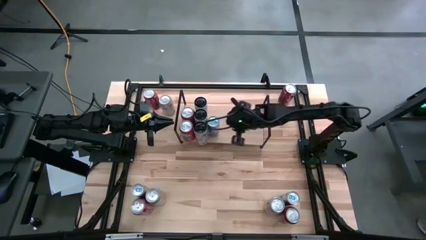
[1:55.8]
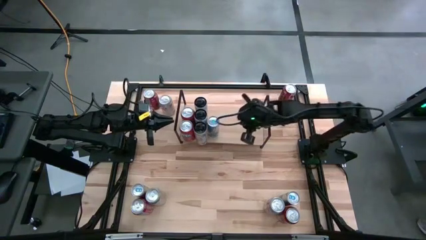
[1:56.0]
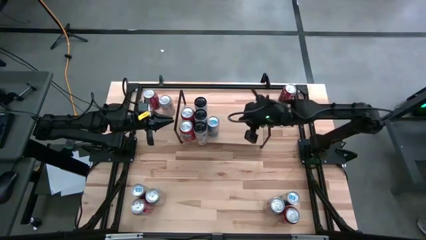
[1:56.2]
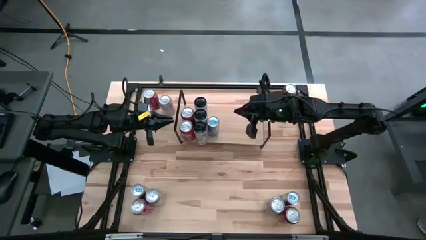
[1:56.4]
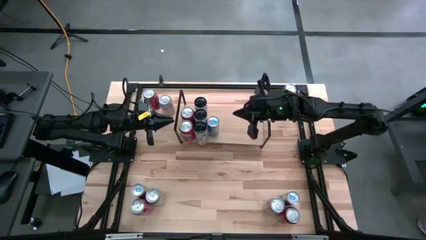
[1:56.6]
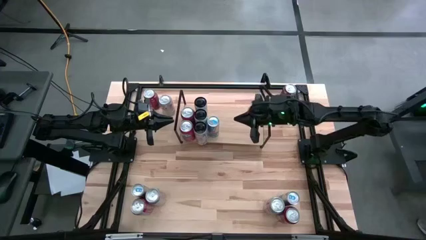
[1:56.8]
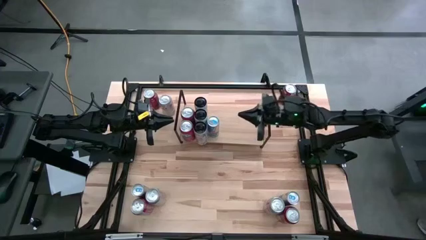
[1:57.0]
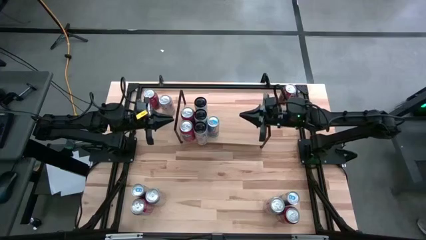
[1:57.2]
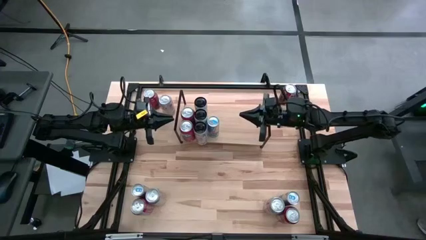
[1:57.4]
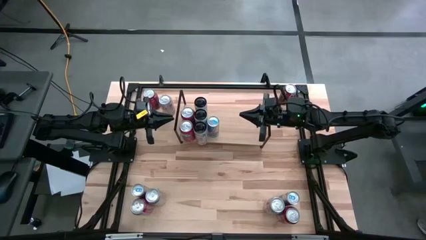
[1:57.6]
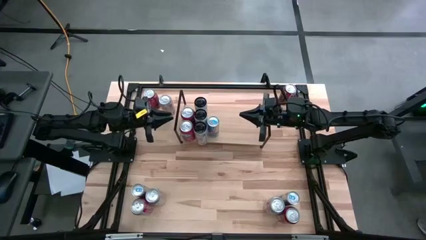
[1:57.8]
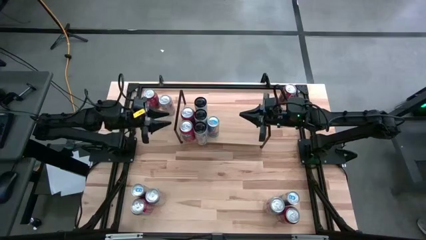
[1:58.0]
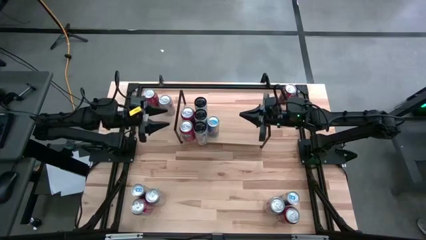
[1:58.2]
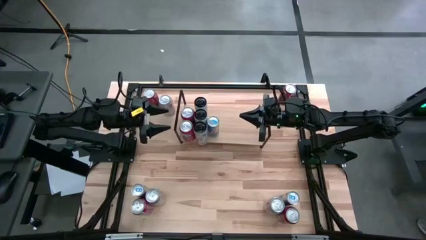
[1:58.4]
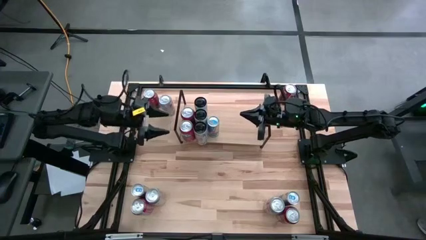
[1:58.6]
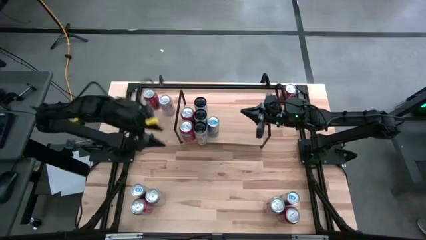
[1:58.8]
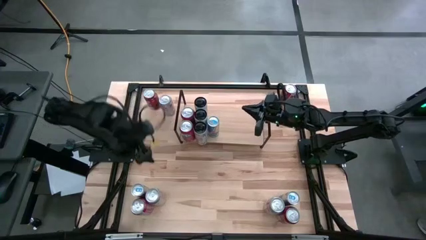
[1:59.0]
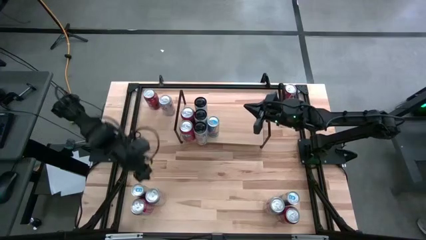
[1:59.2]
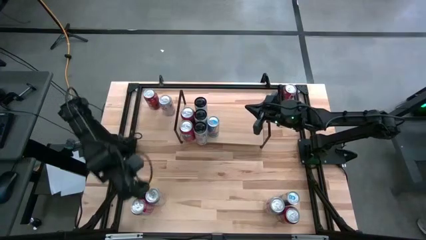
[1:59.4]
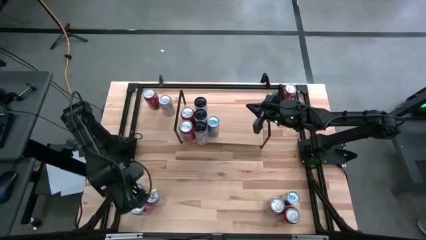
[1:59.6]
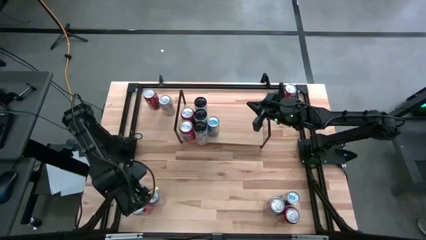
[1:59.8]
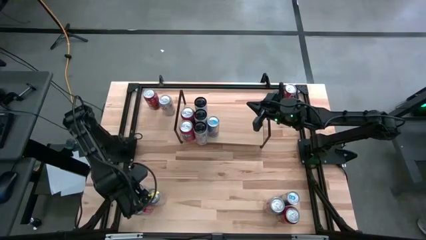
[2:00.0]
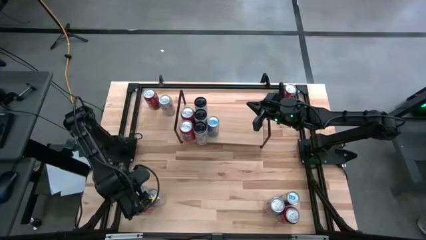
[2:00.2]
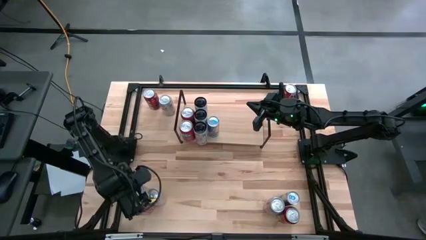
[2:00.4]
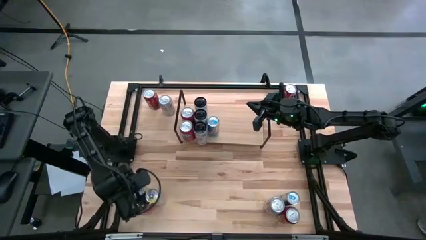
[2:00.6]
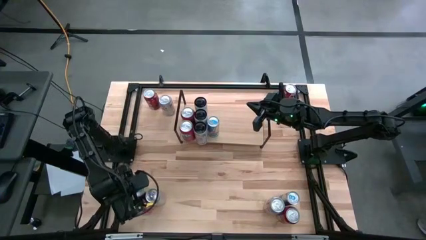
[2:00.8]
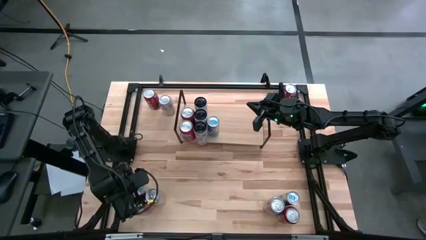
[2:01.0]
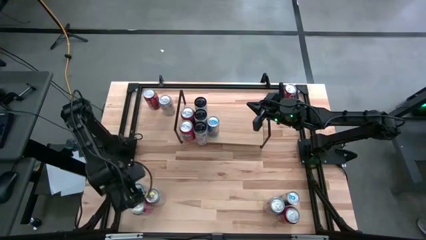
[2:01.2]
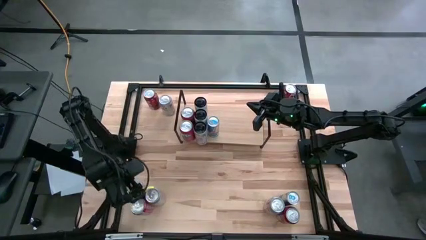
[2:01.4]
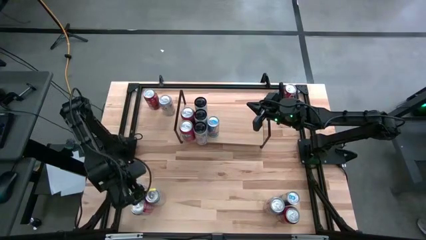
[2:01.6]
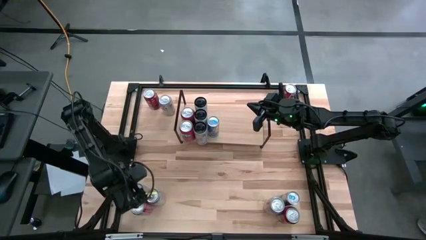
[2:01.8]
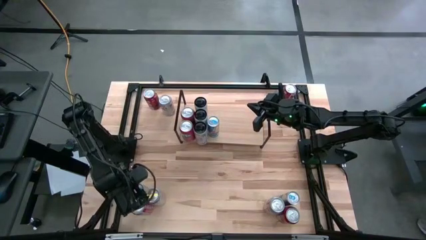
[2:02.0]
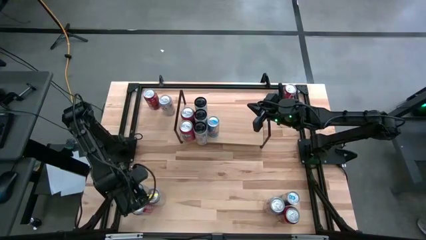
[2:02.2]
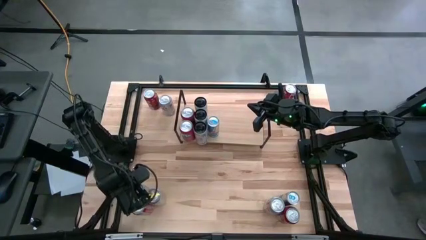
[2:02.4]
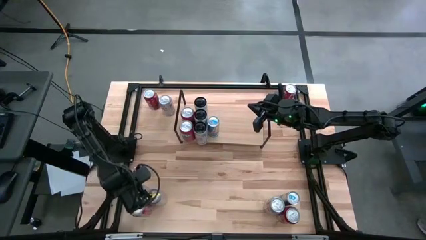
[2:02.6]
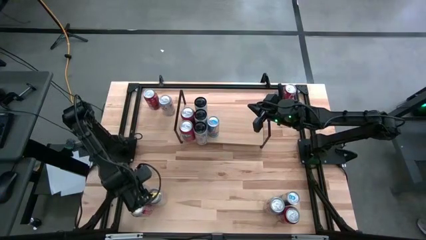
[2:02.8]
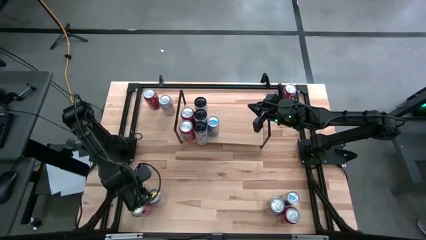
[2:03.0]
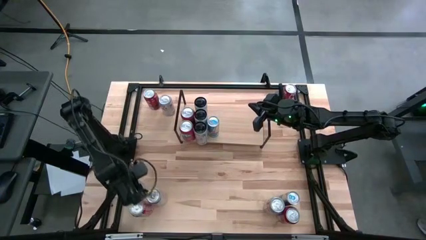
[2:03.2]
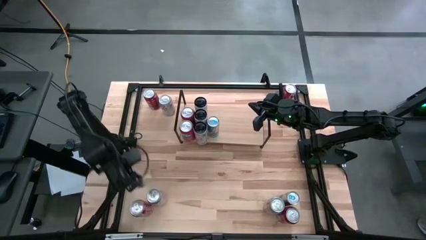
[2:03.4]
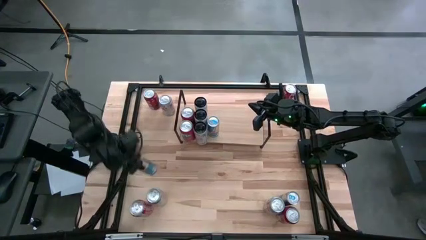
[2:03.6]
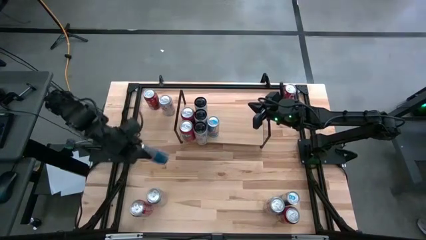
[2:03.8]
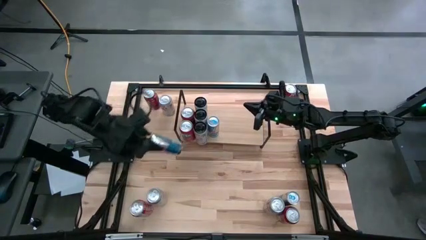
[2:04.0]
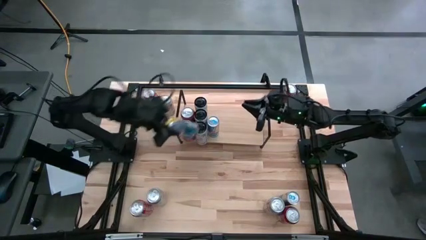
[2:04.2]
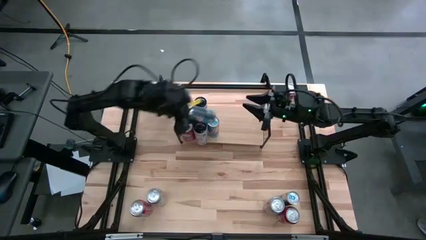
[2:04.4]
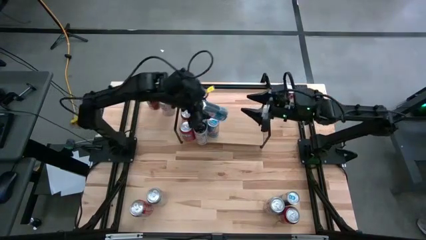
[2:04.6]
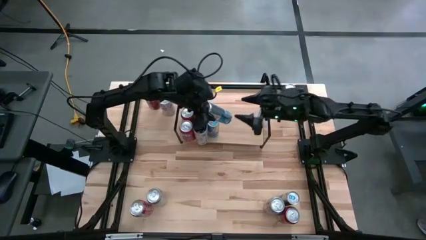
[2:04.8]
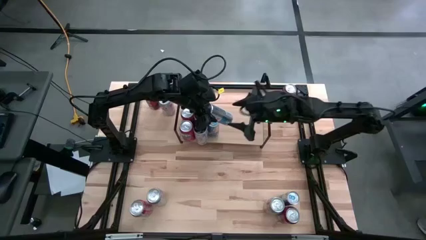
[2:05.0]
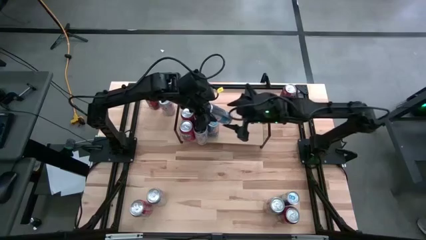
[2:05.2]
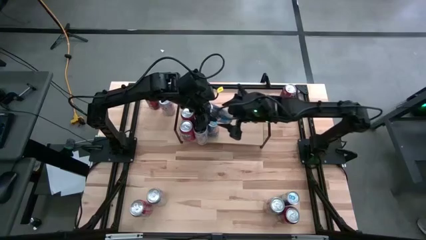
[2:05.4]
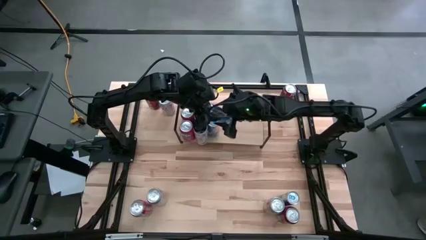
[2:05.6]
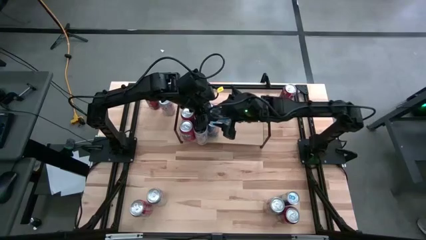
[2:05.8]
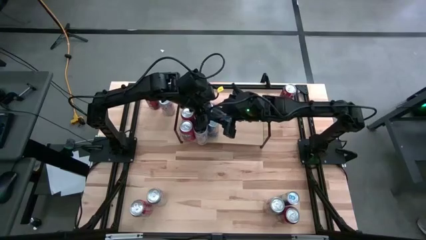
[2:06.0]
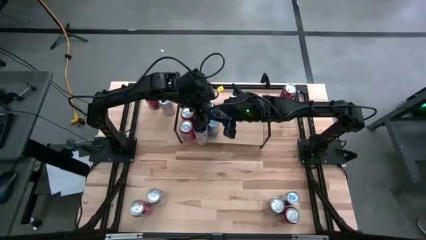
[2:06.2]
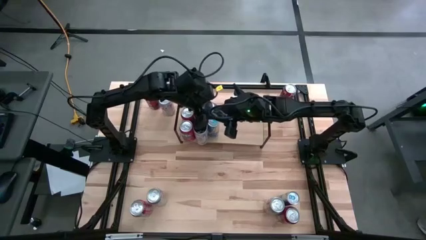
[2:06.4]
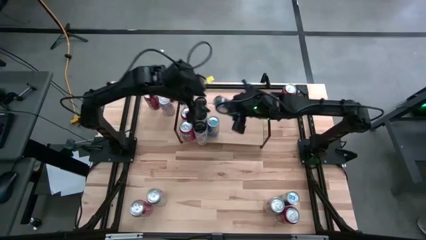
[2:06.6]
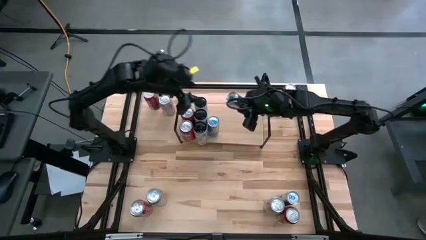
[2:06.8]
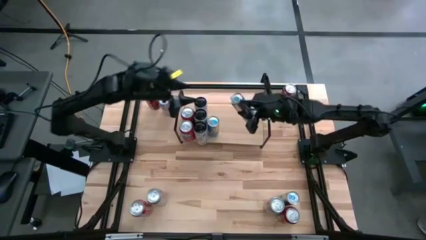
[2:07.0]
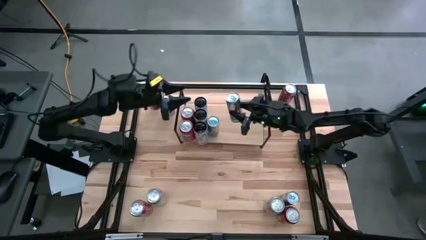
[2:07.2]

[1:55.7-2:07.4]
Task: Place canned beverage on shelf
Put the left blue soda can on the shelf aligned with the other blue soda can

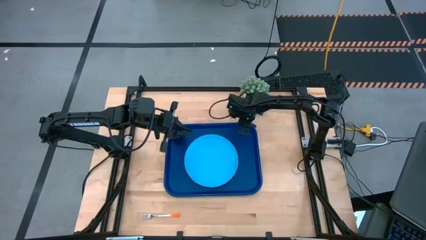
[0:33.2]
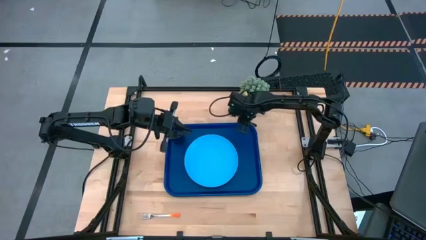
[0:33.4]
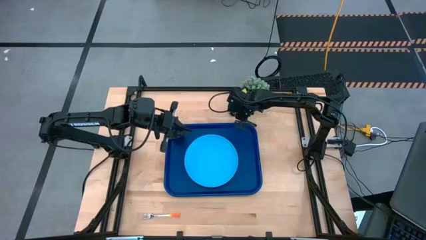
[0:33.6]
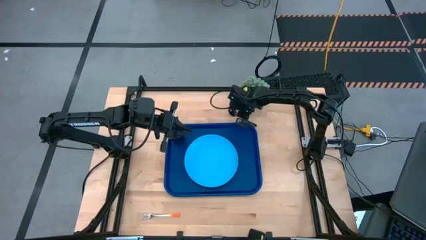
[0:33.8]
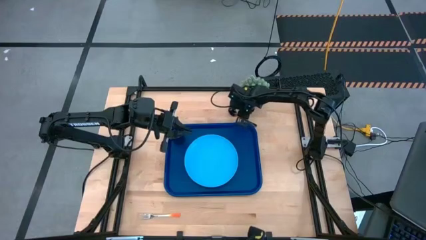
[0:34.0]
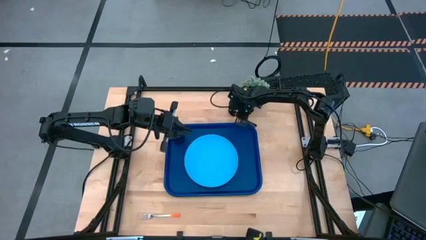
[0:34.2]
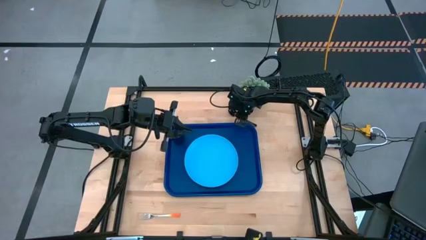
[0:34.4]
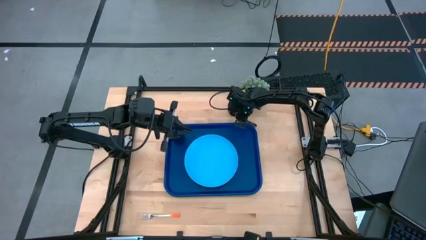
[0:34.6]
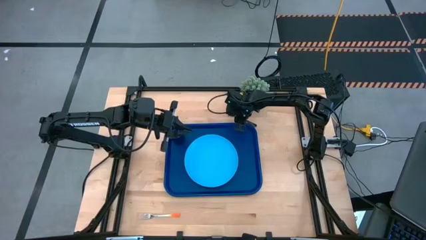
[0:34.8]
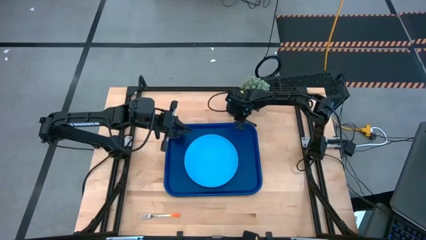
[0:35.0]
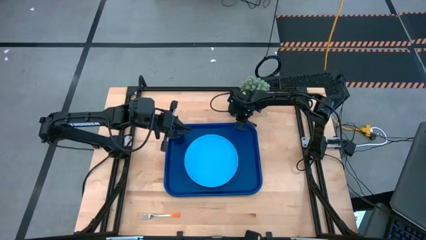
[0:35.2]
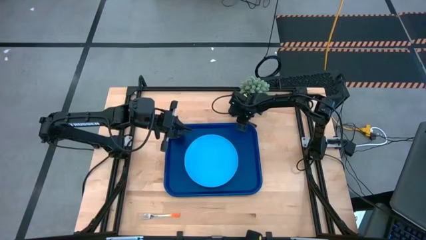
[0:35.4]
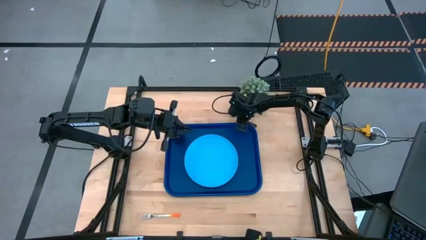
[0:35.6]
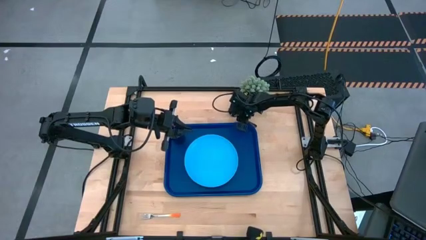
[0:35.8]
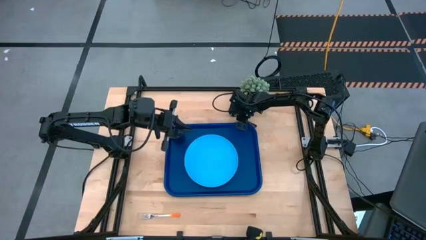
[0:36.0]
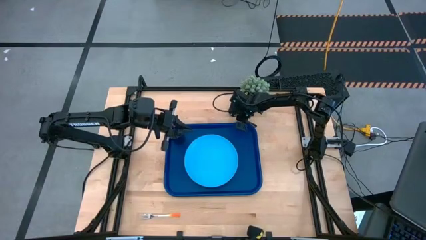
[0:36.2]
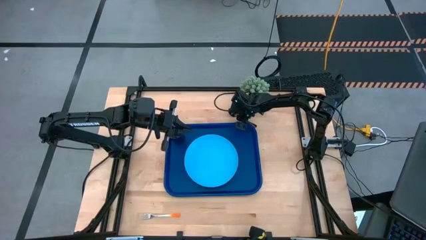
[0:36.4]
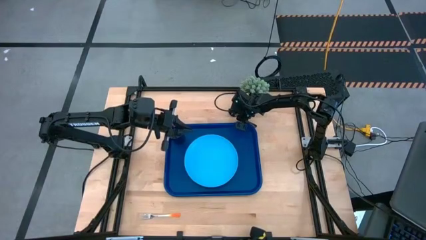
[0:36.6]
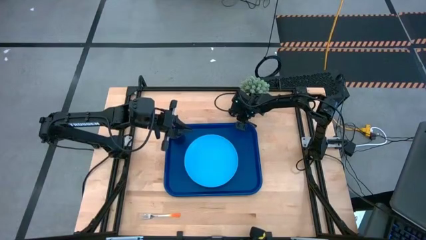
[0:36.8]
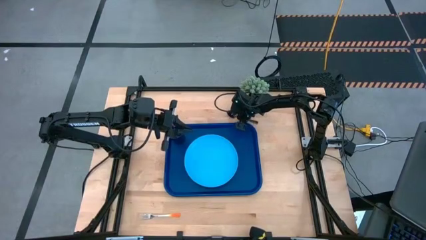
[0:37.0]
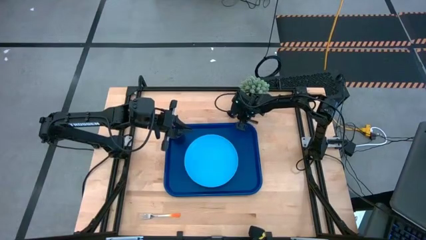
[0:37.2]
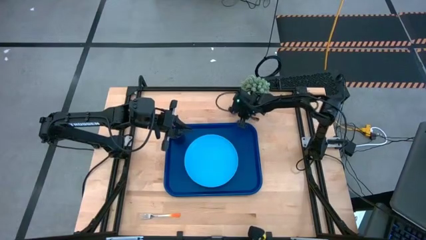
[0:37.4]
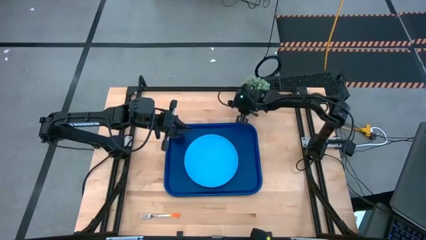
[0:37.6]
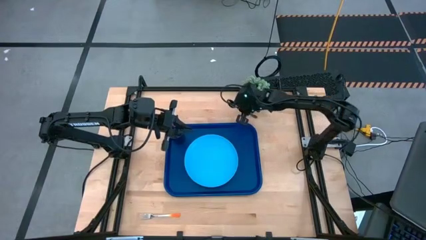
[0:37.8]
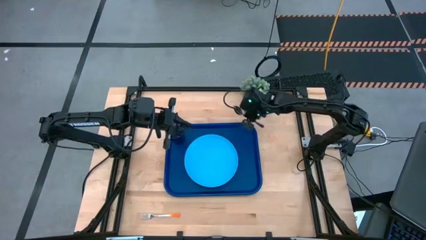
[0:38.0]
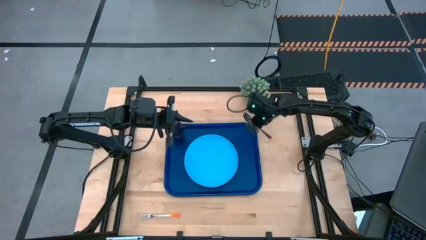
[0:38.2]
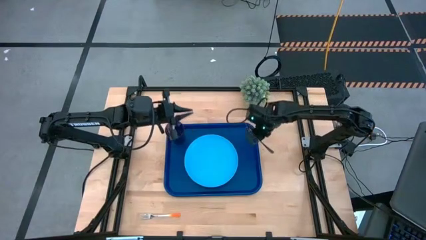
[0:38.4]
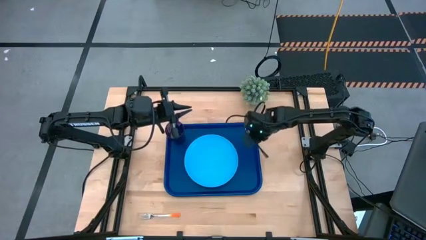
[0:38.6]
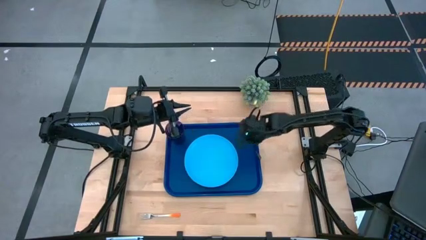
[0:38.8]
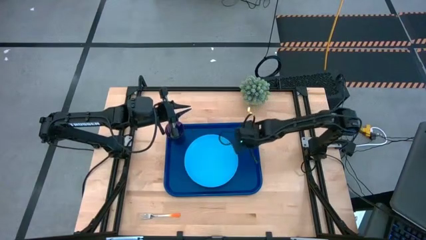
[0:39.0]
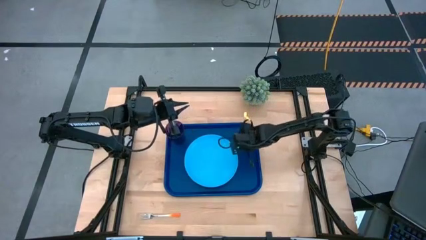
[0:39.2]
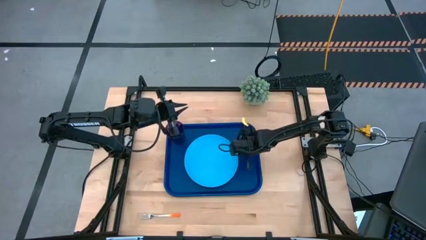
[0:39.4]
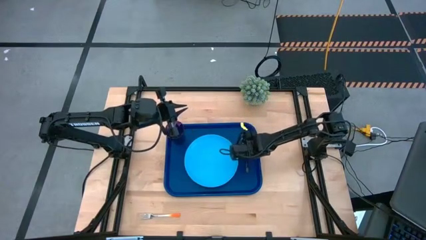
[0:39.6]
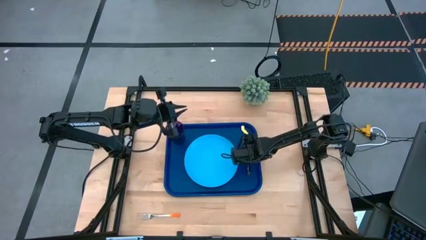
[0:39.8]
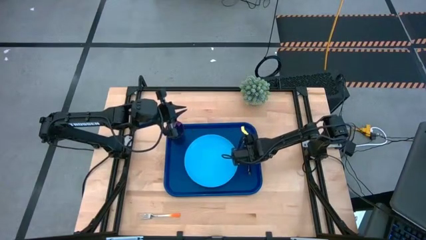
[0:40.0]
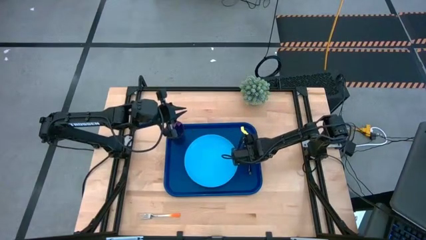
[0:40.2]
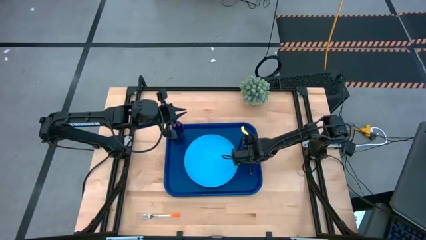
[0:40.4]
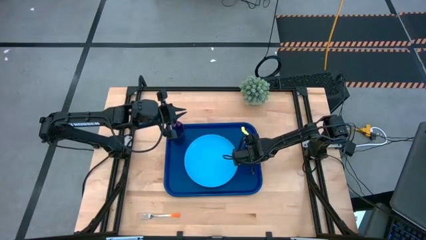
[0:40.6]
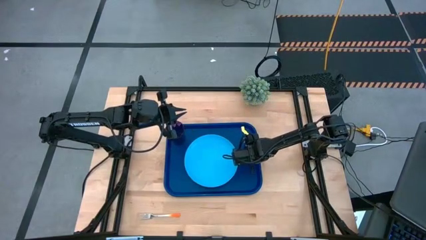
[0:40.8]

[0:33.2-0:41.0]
Task: Pick and place plate/cup/fork/spoon on tray
Put the black spoon beside the light blue plate on the dark blue tray
